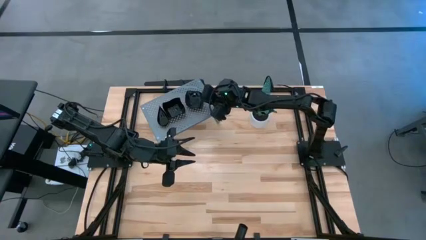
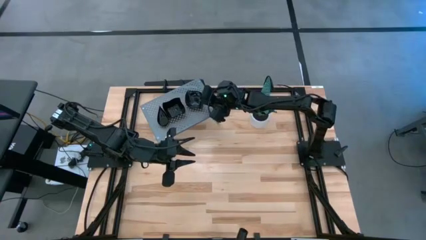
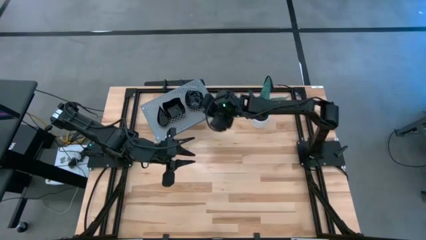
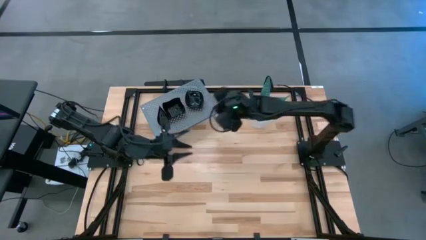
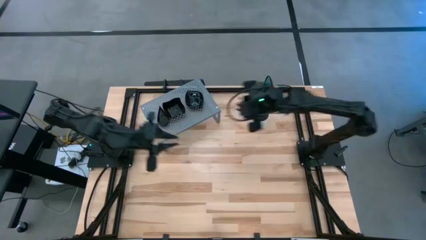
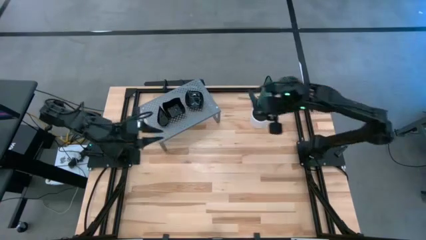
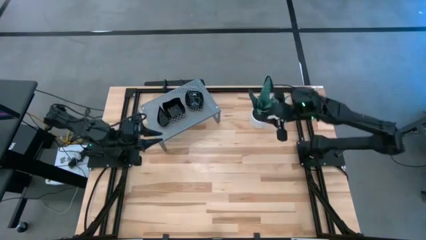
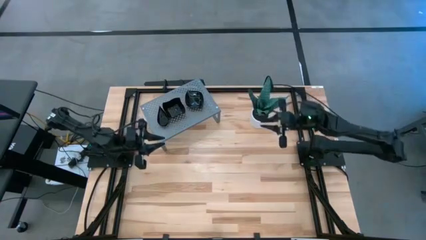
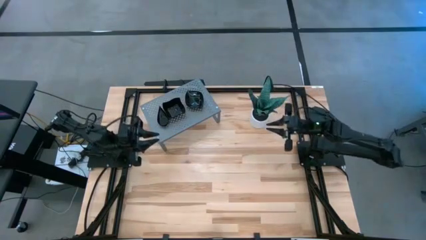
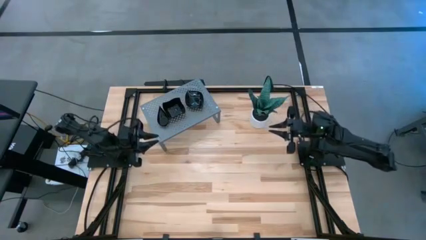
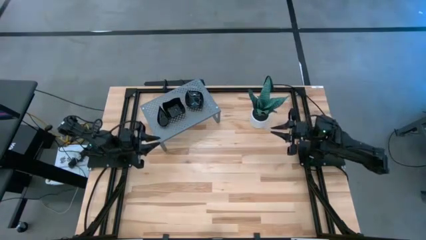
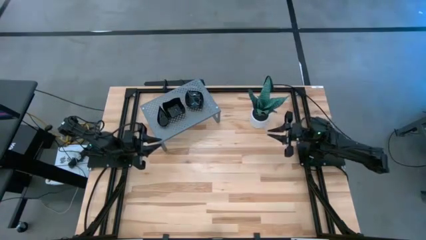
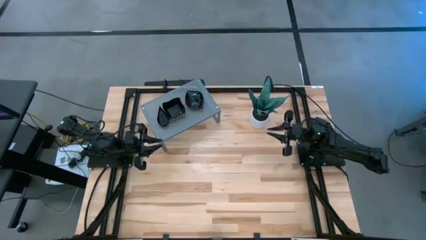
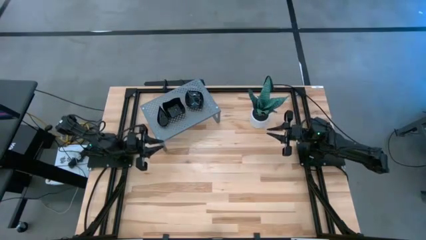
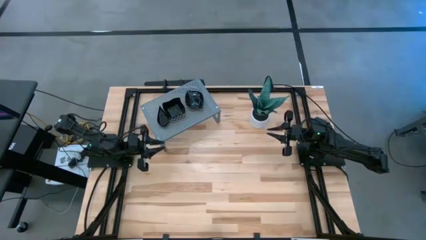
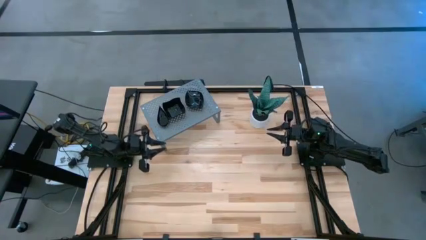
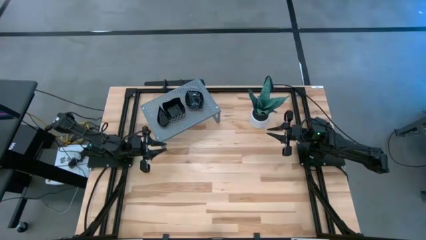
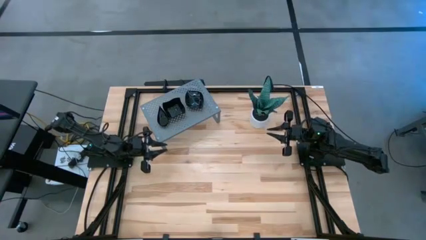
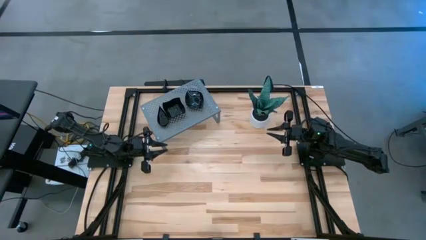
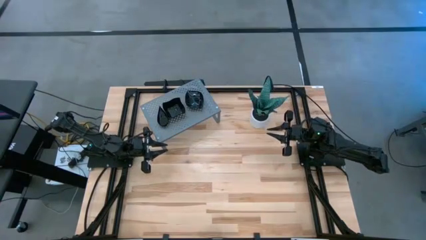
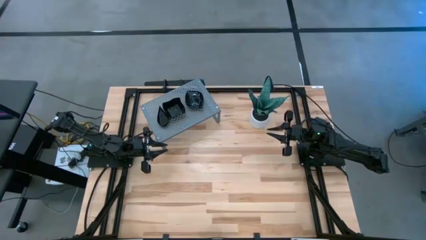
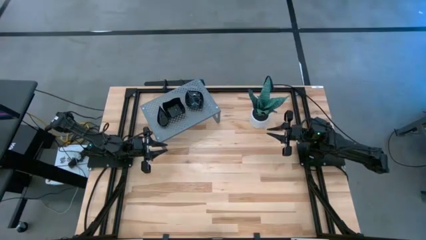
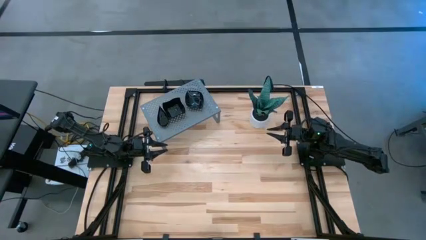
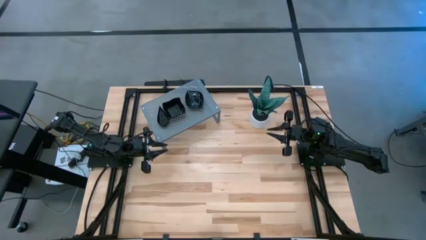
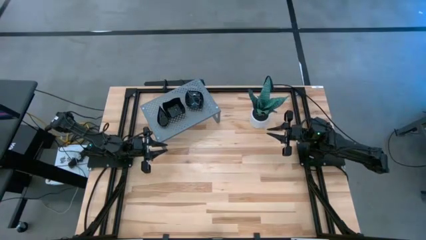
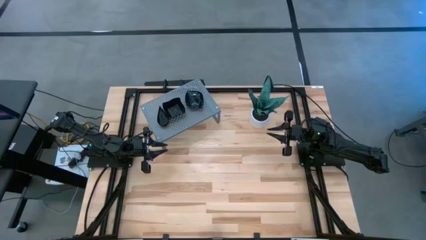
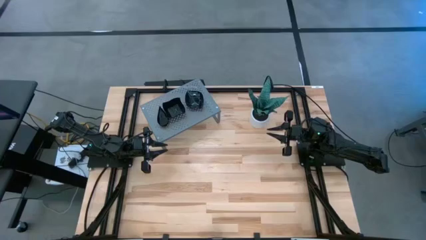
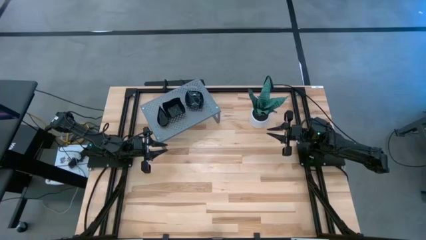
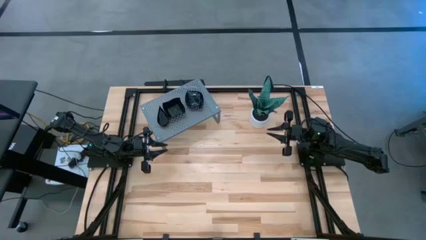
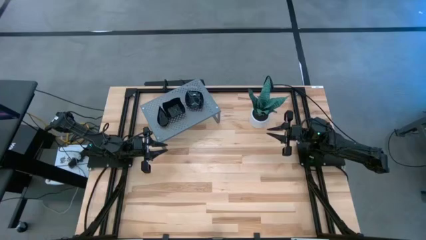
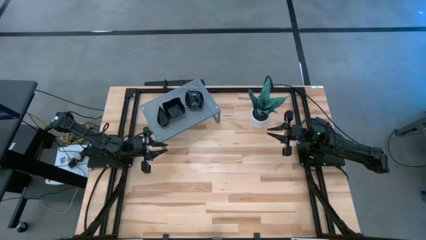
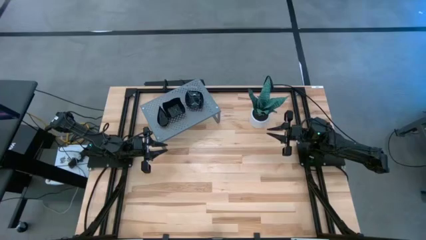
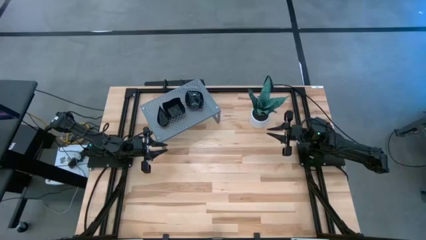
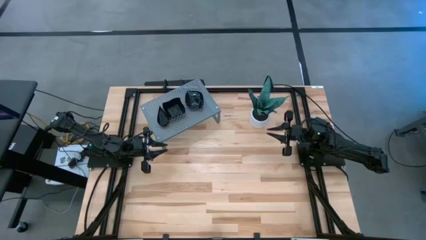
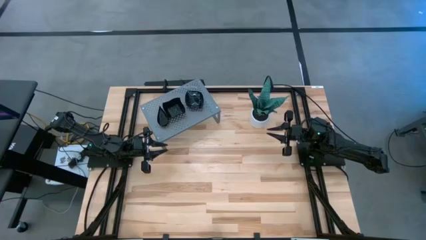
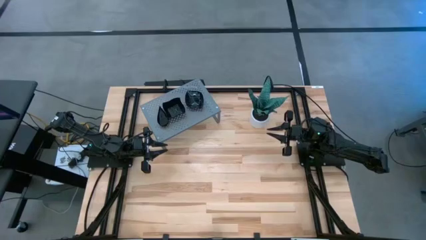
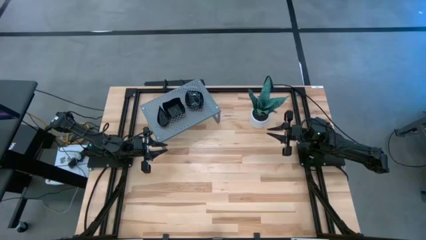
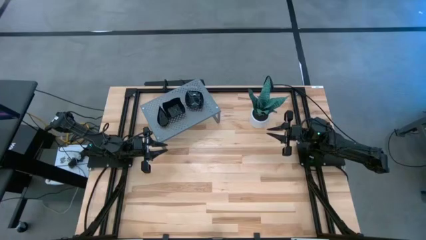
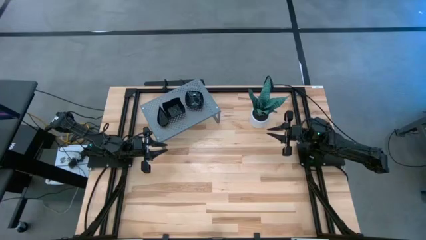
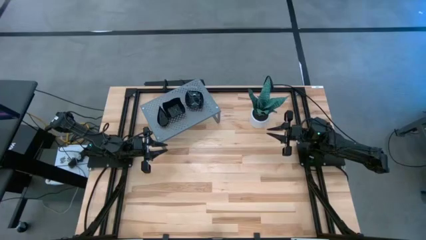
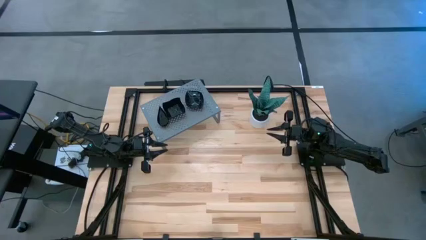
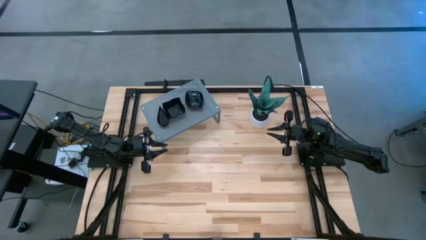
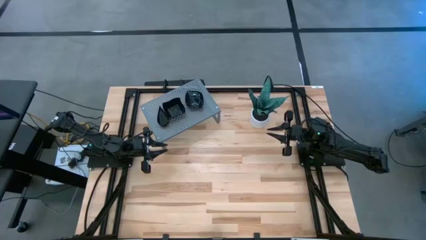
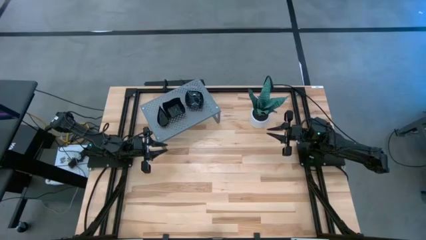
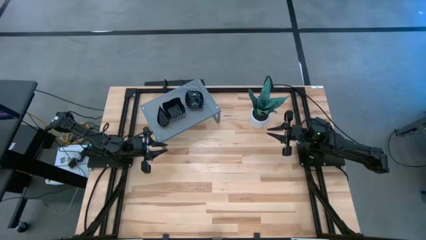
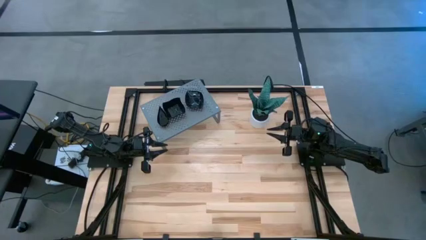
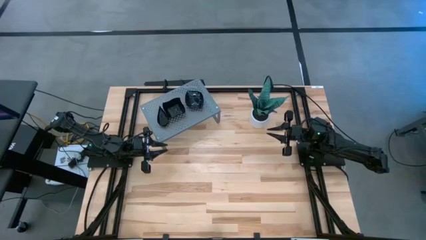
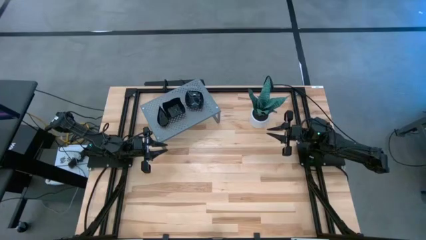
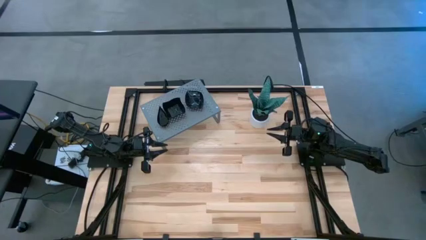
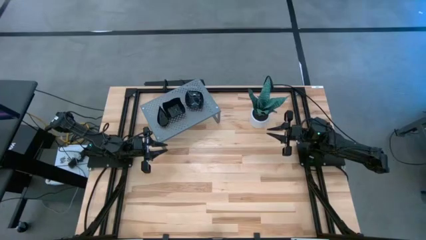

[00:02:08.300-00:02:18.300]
Task: Pick & Place Mini shaped plates
Return to Home Position

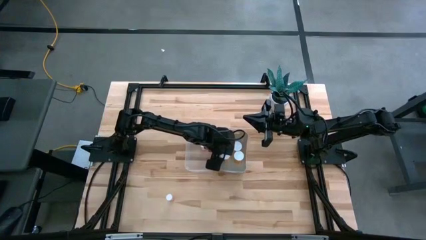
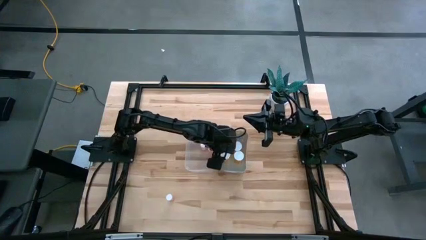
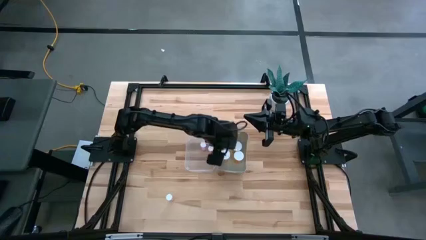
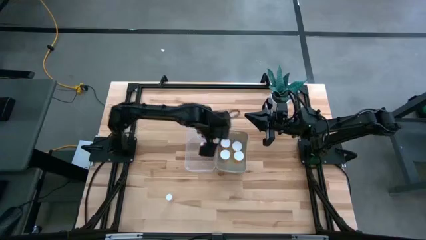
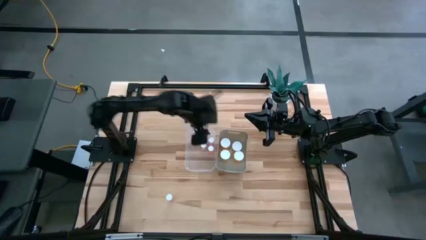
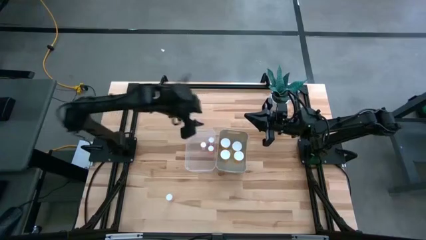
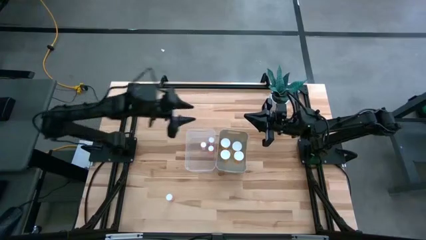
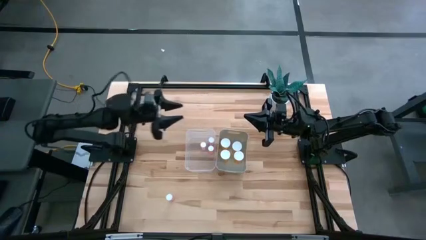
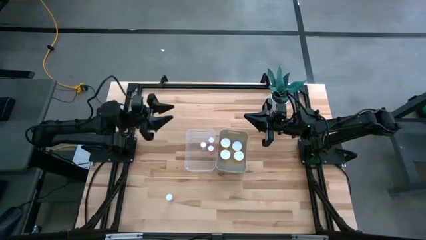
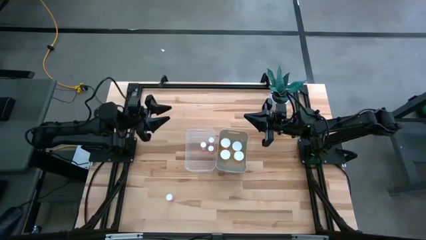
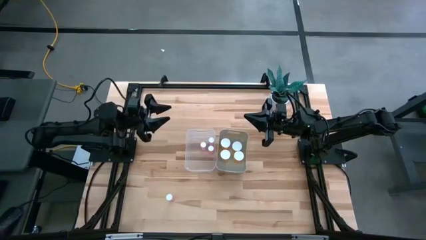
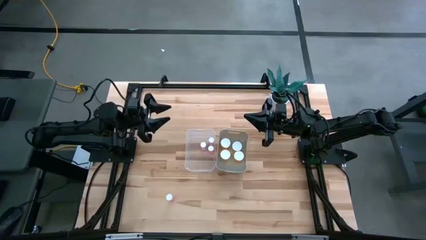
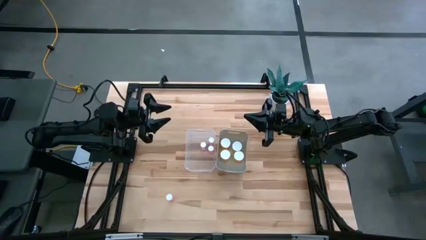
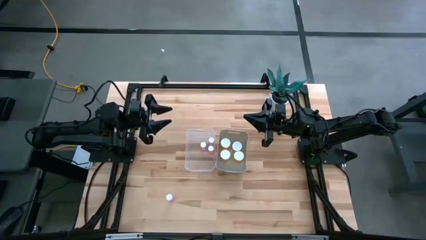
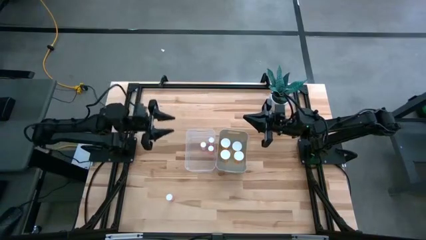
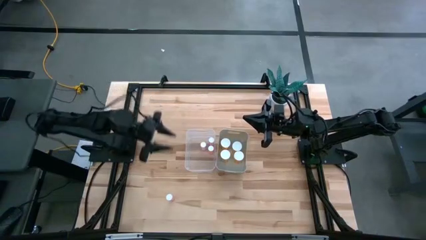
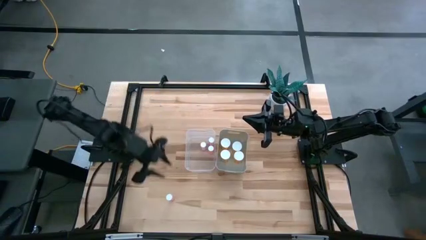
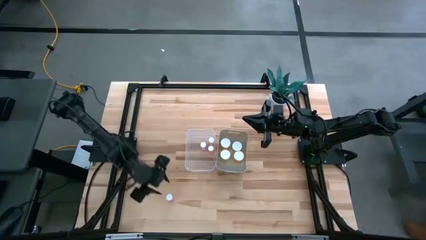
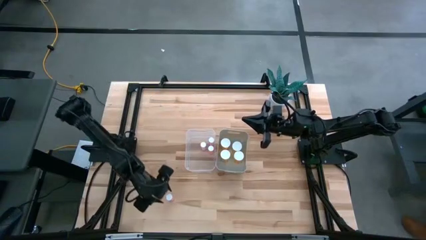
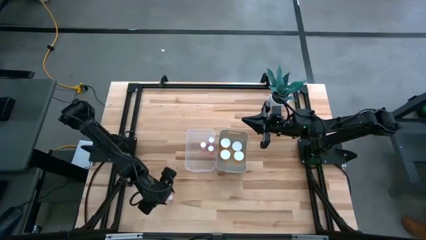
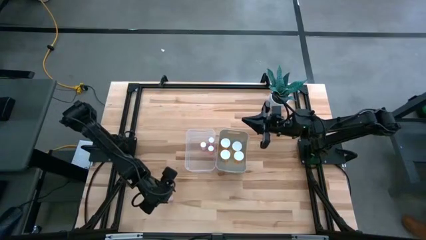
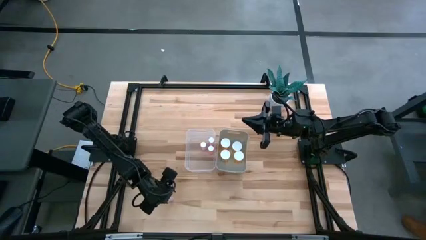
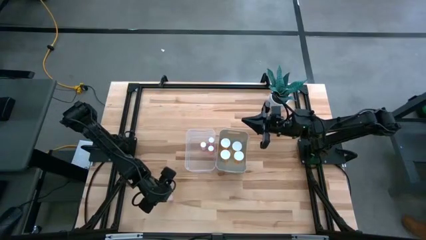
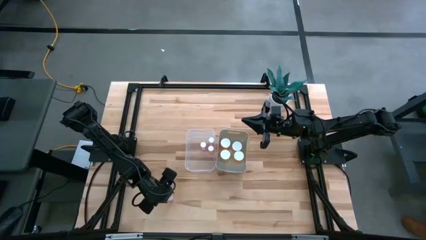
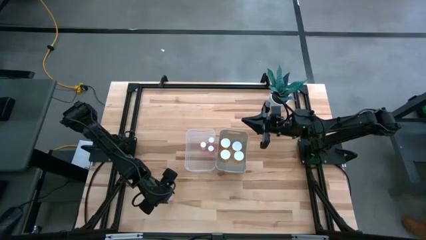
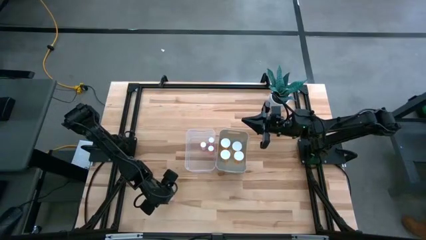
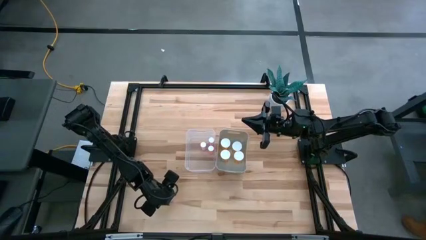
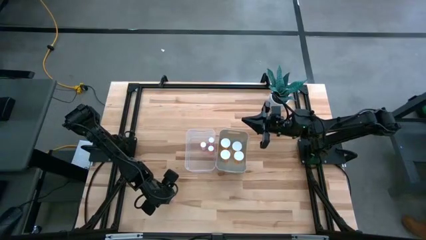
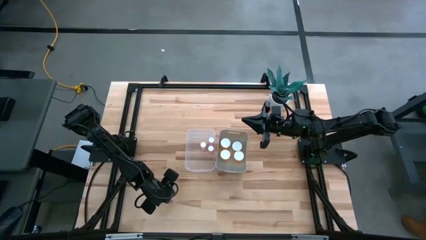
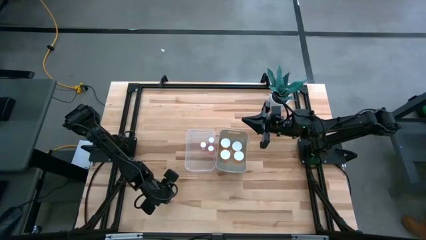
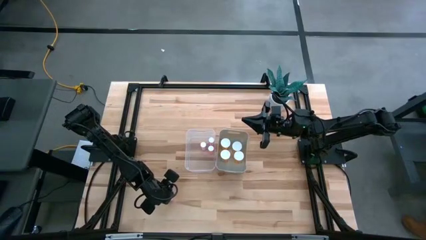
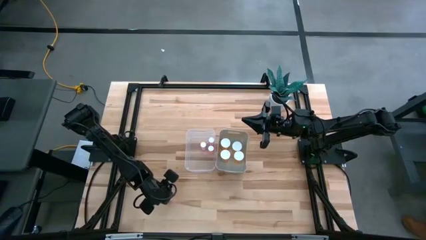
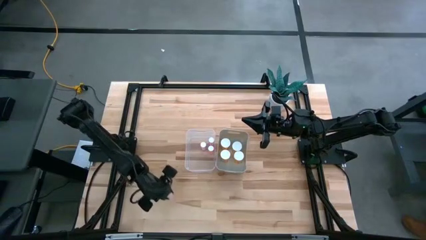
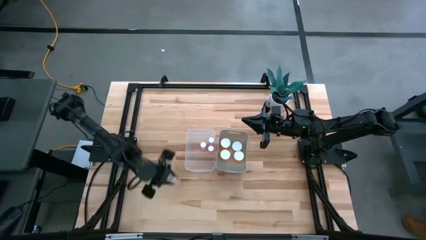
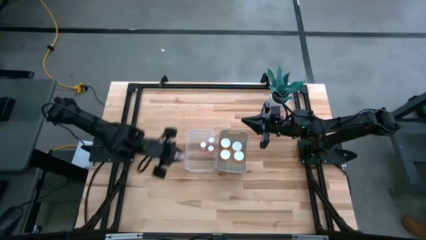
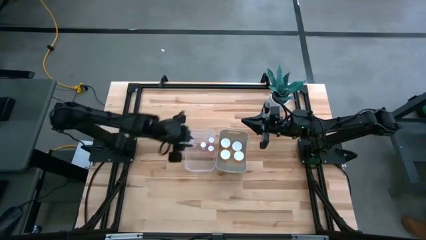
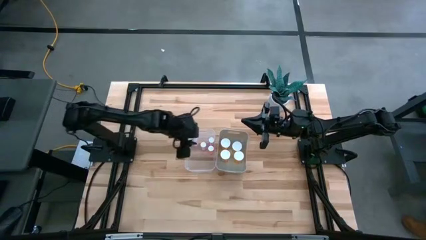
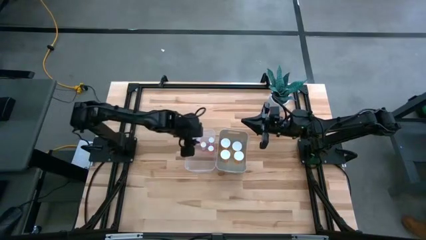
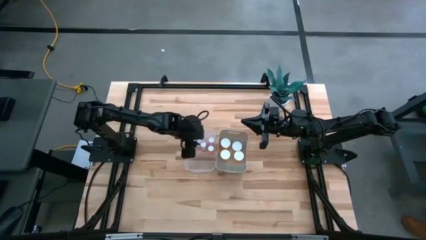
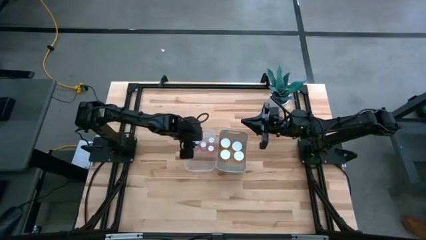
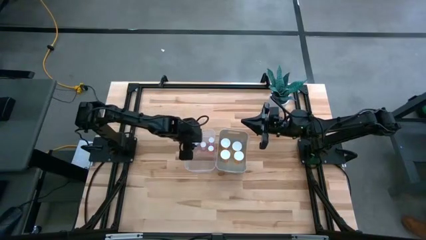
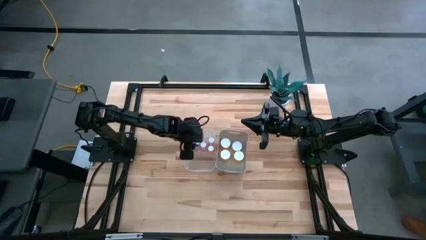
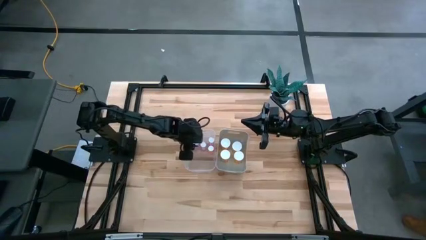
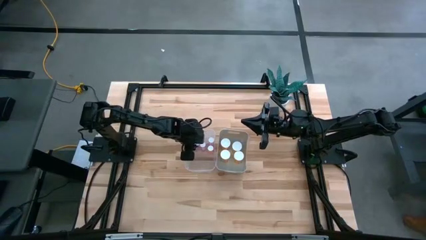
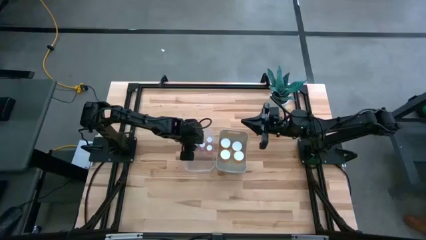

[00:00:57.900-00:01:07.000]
Task: Pick and place medicine bottles into bin by pill shape (circle, oval)
Put the small pink pill bottle into the transparent bin
